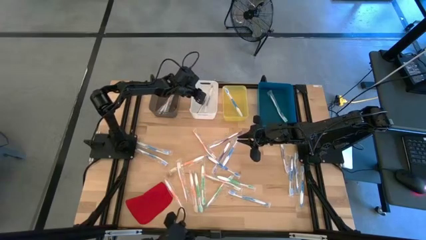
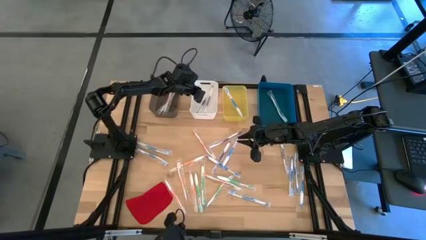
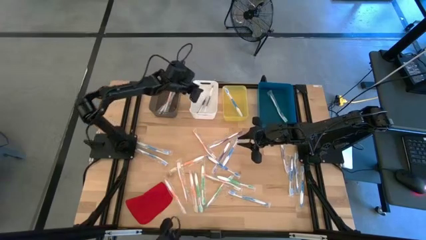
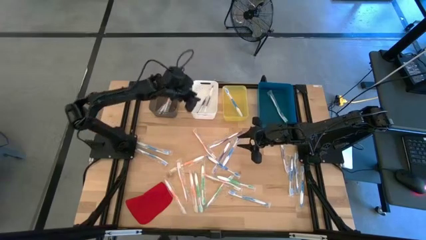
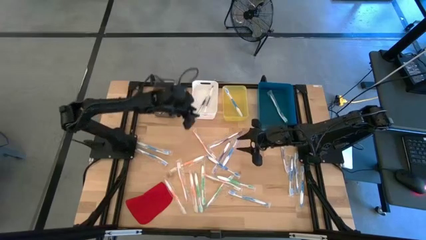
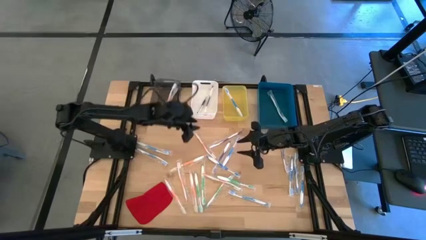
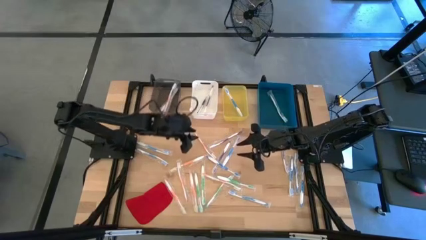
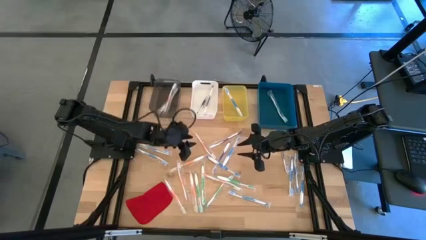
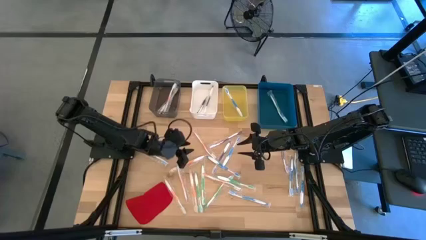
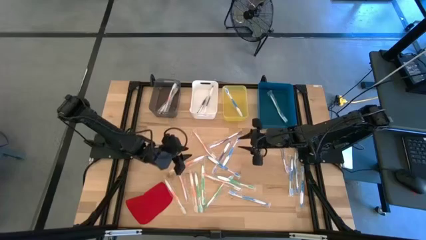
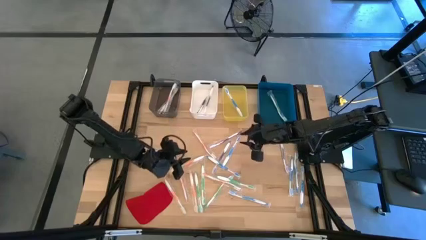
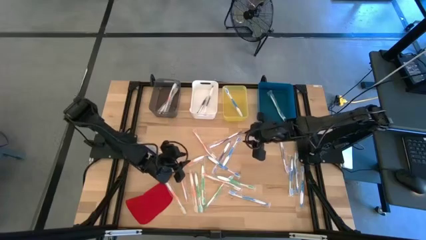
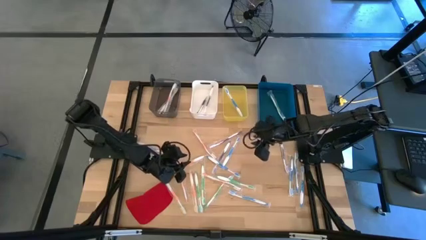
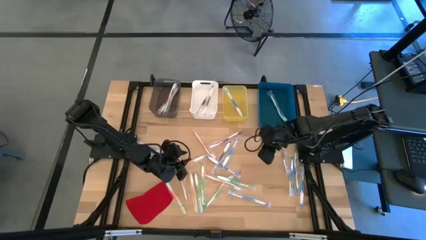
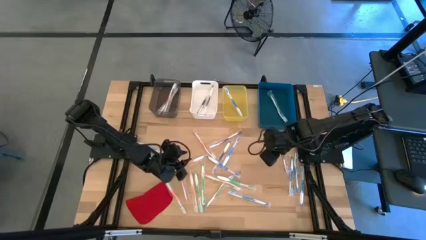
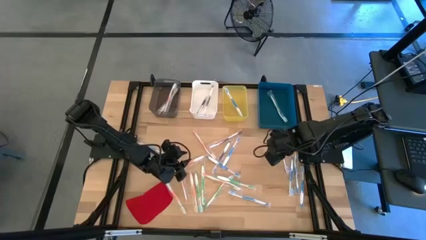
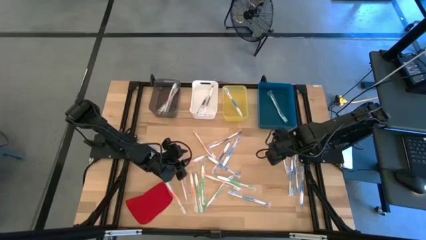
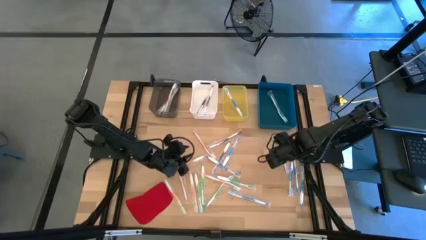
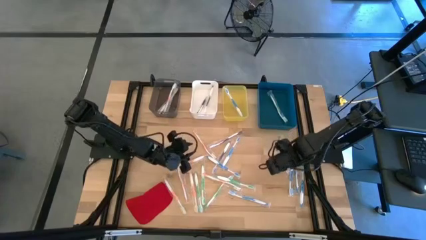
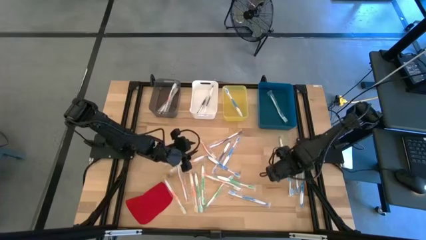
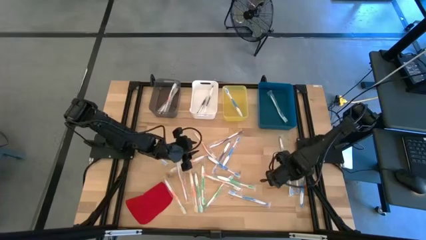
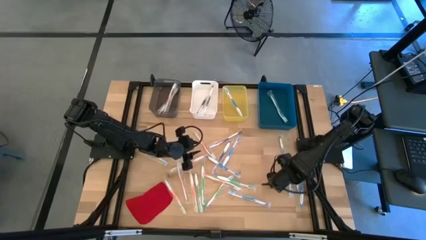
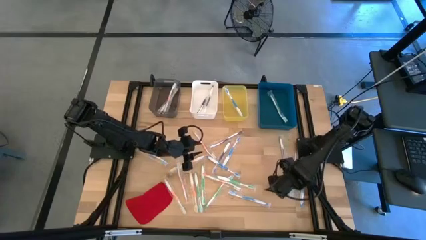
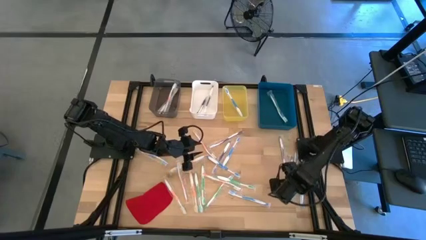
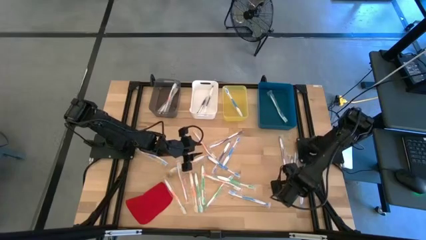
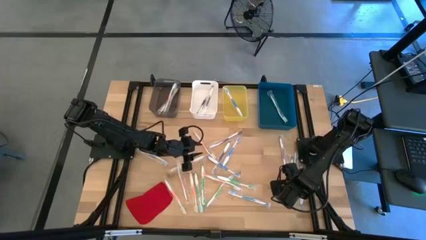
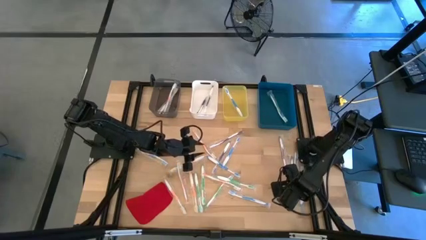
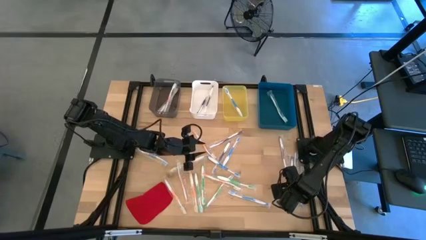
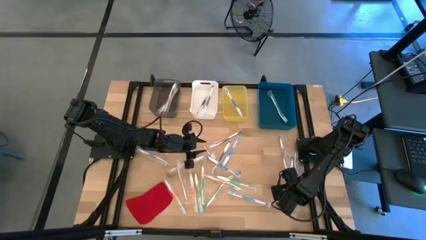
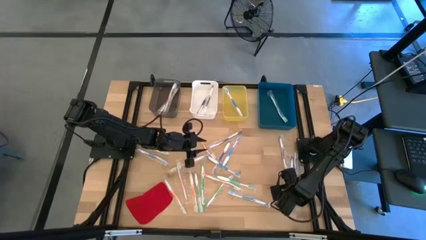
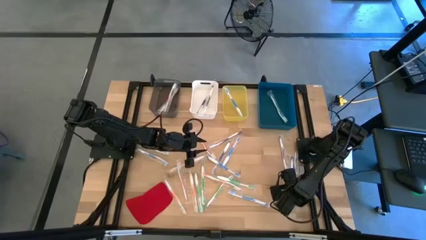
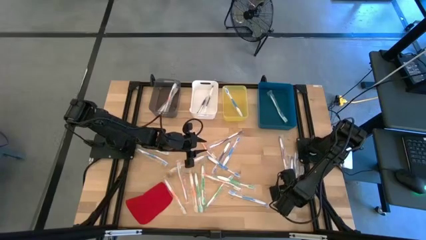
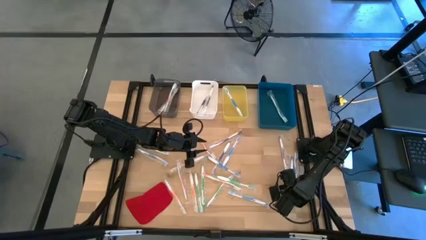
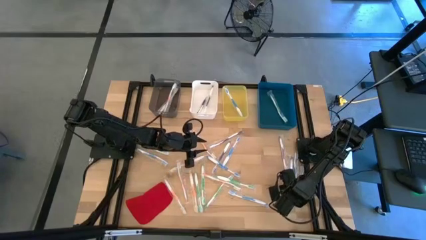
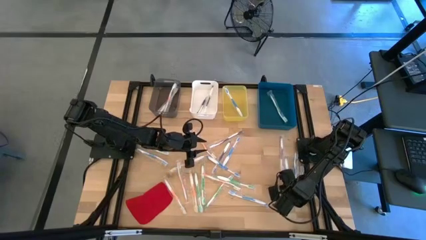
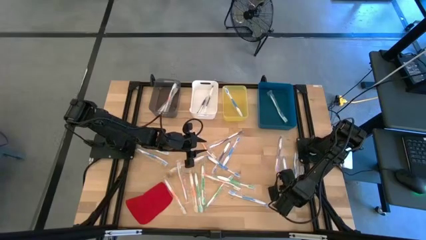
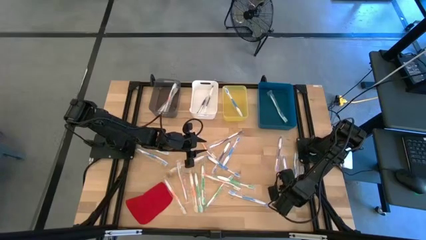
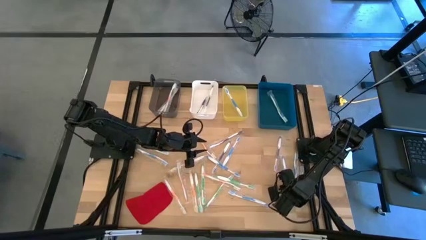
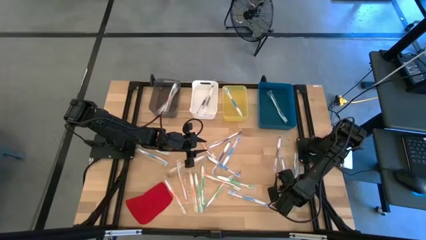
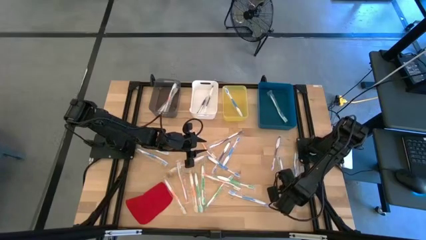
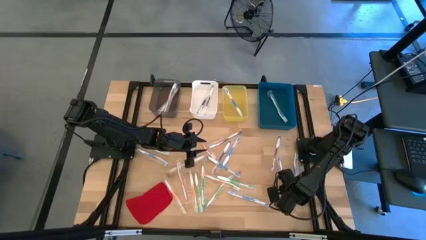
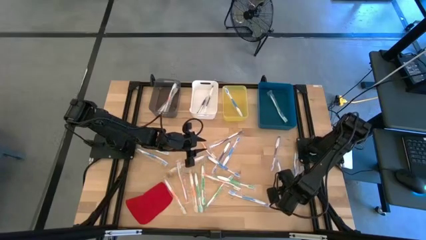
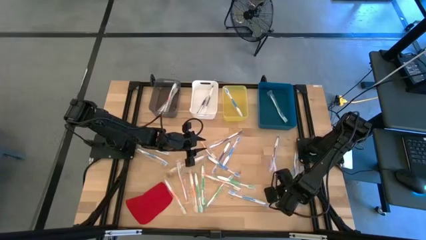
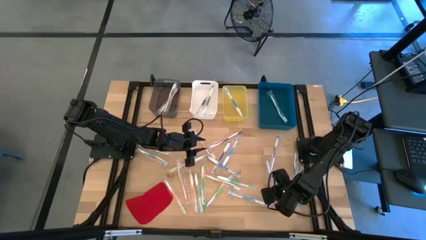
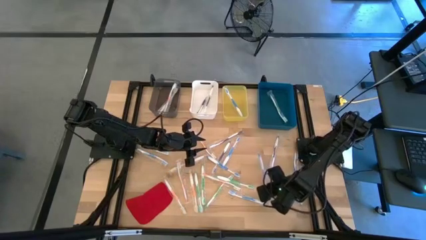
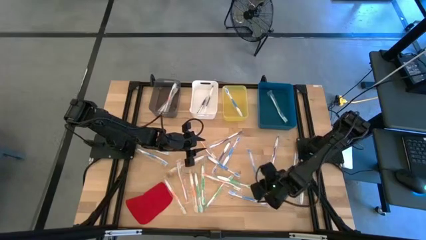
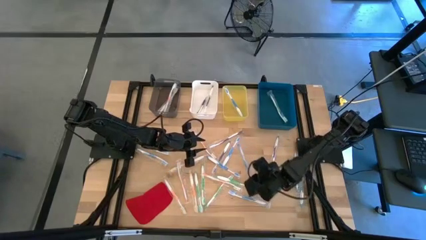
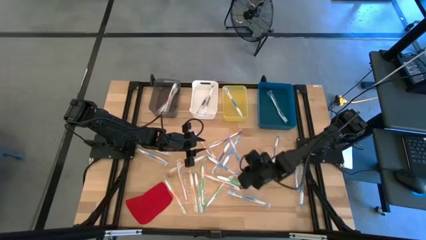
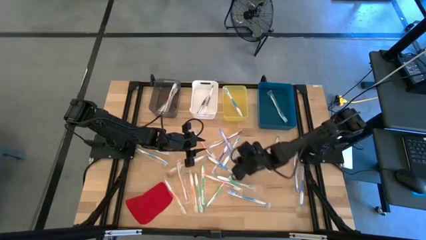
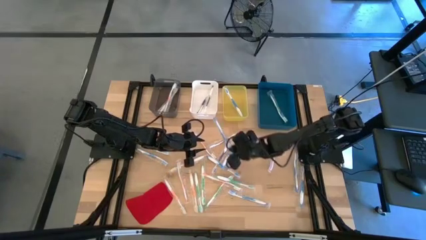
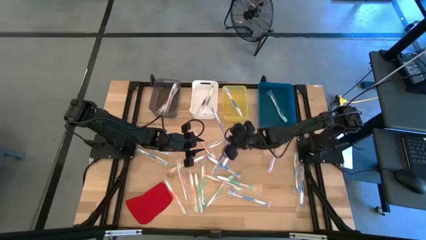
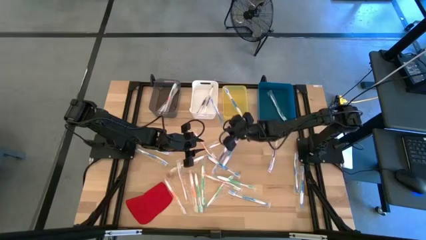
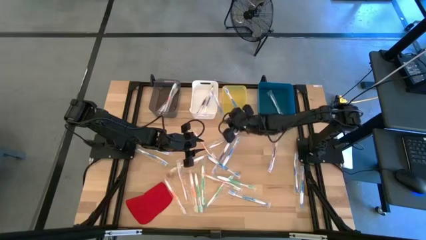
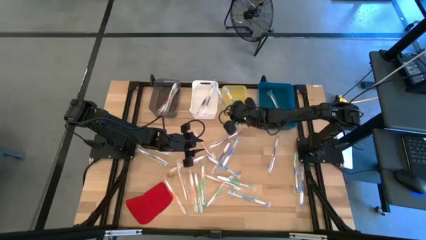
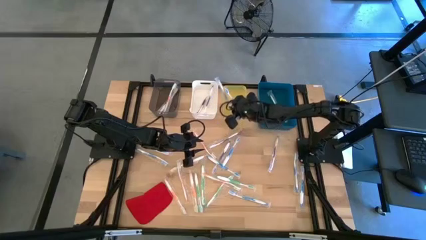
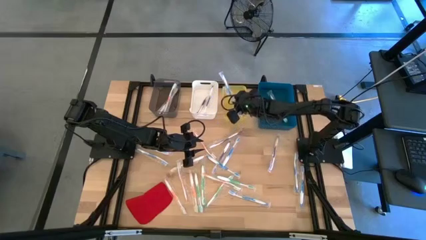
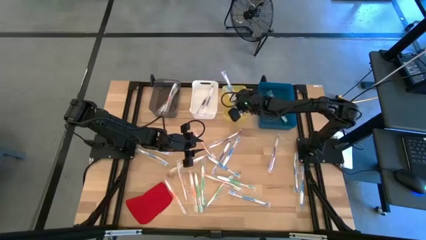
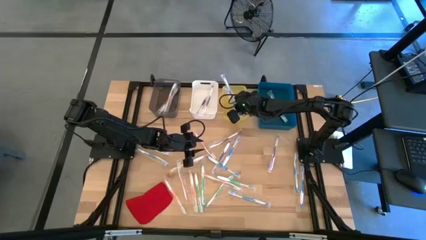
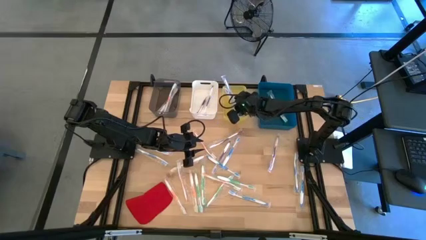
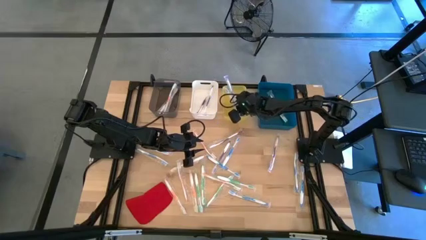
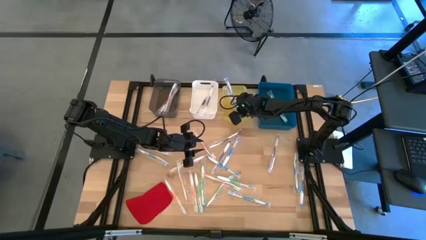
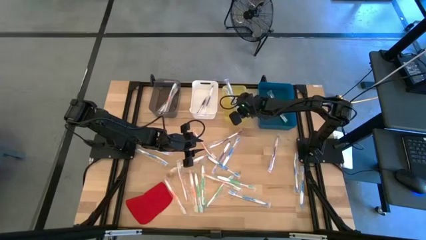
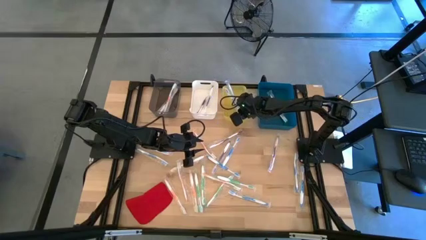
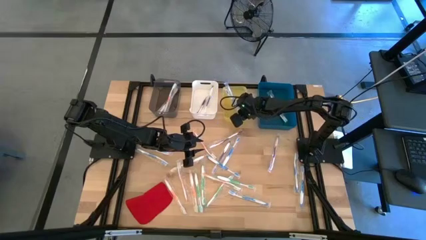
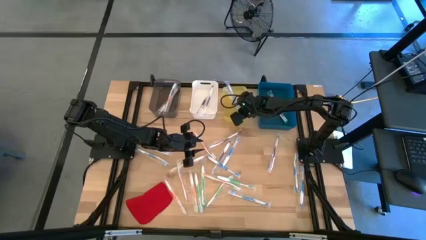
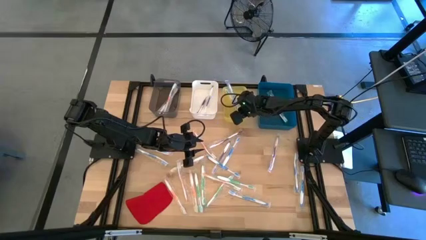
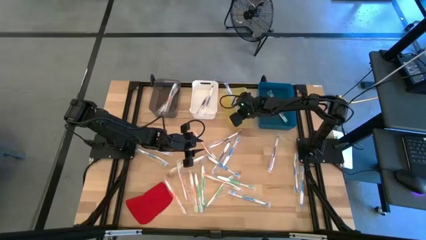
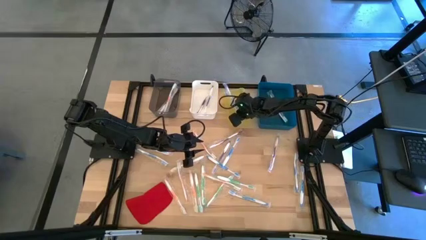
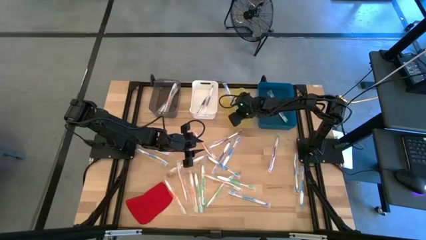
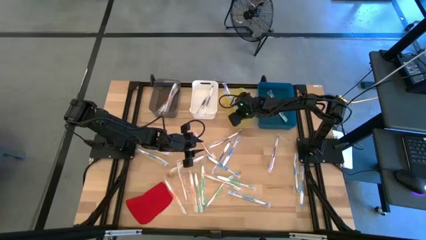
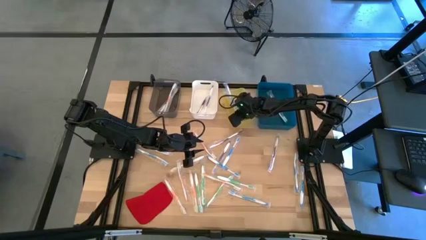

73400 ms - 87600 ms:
Task: Pick & Place Toothbrushes
Put the blue toothbrush into the yellow bin

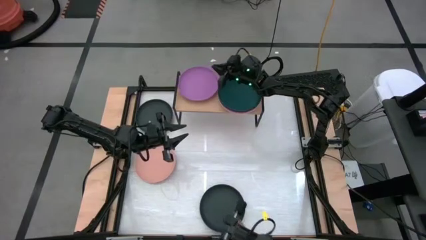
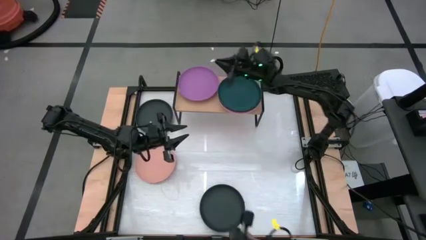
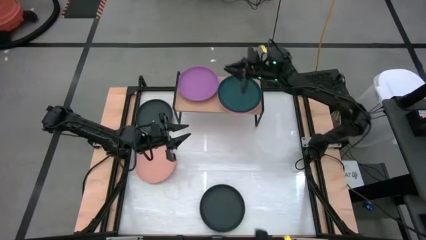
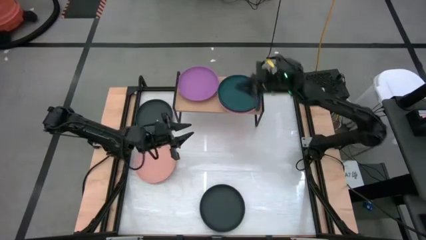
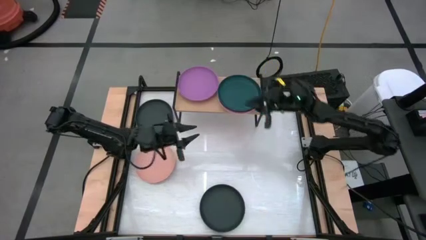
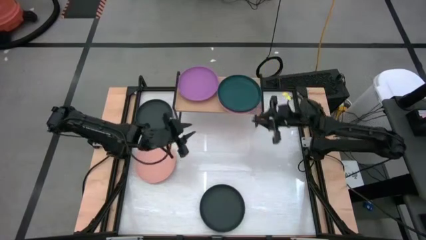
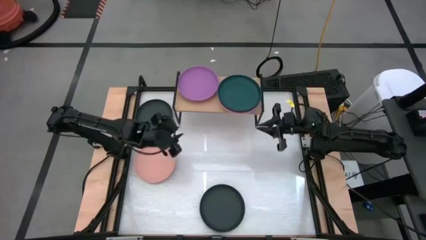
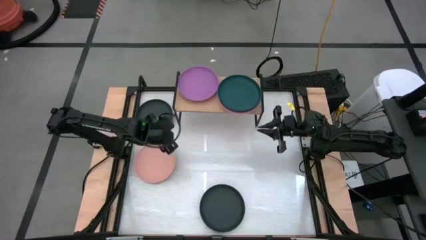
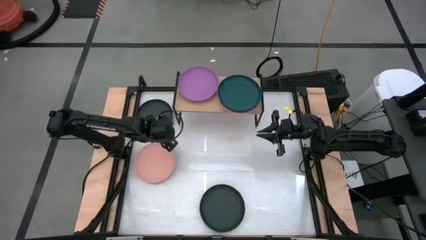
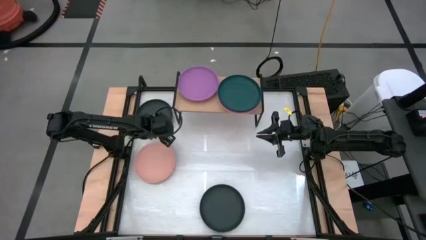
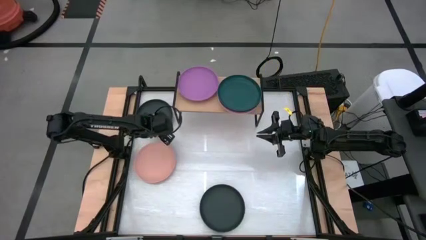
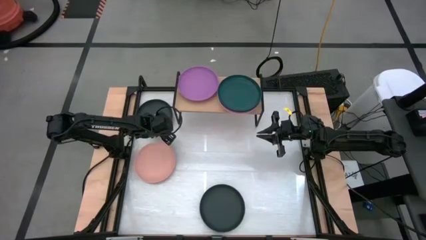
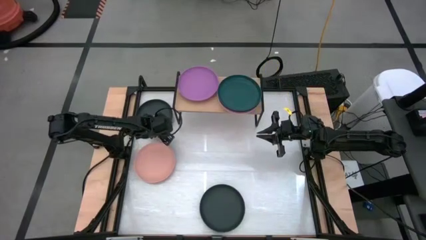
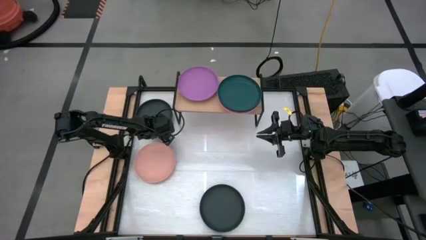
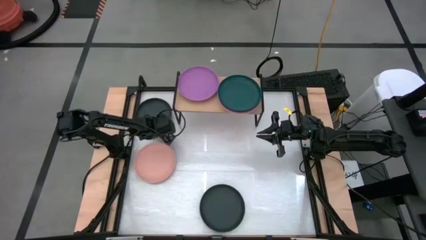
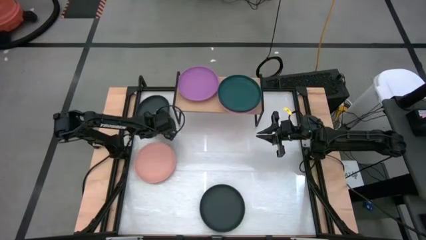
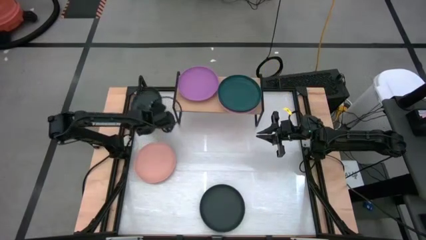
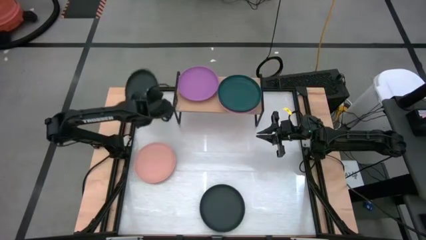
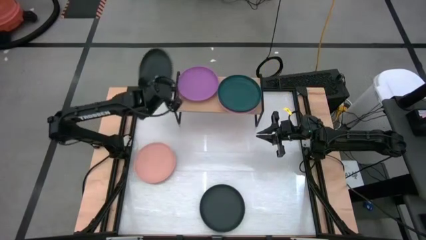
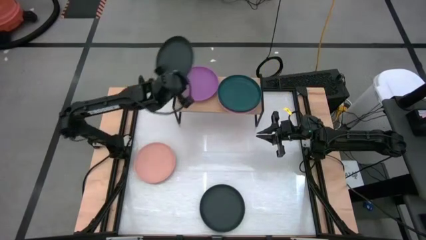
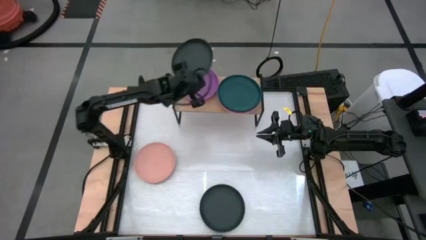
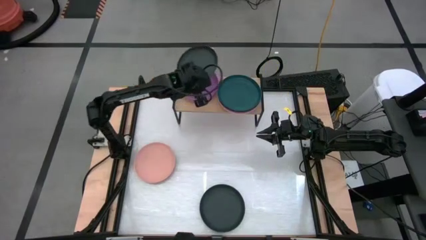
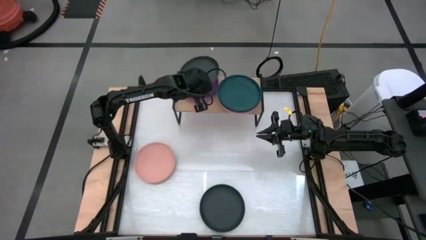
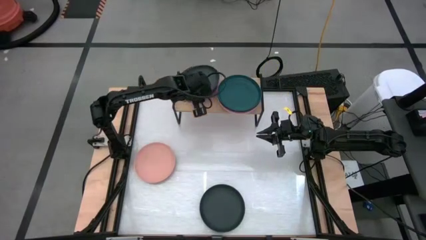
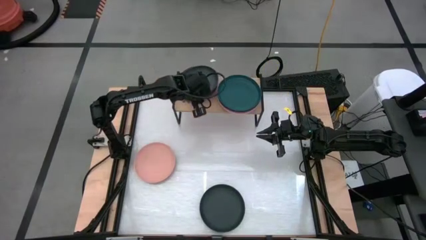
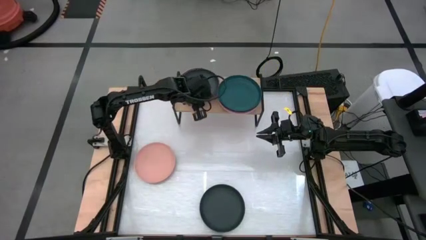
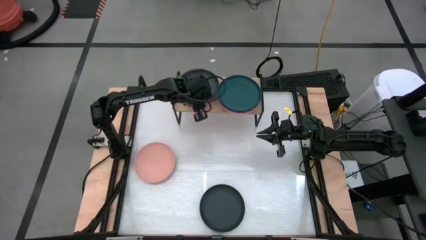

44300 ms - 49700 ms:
Task: Place and stack plates onto a shelf
Stack the top black plate on top of the purple plate on the shelf
